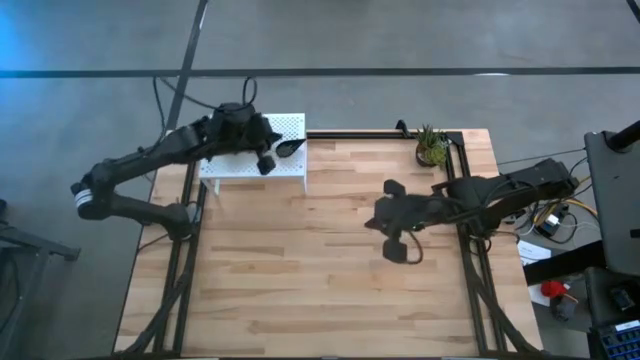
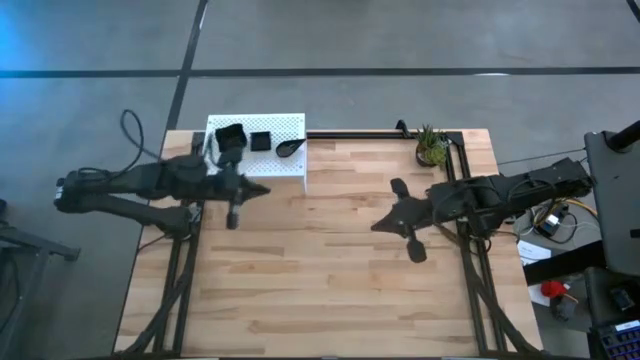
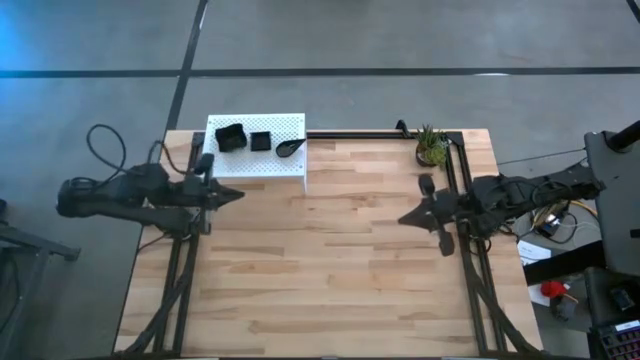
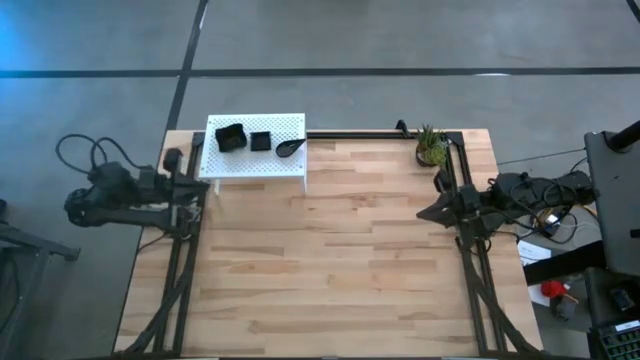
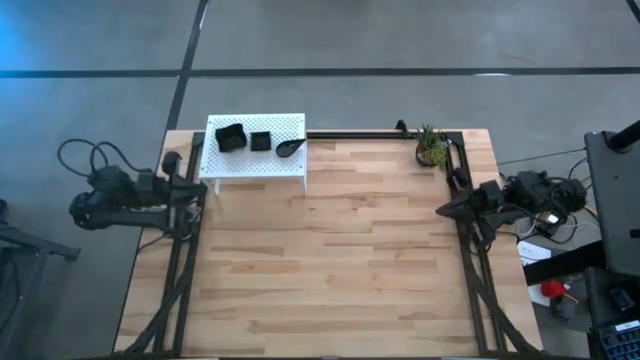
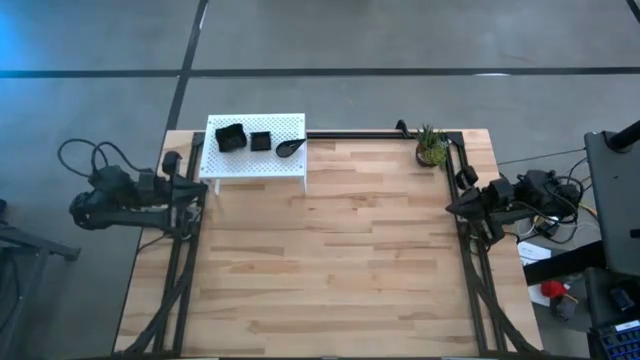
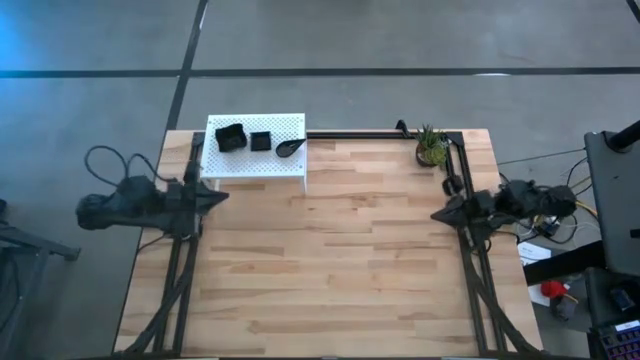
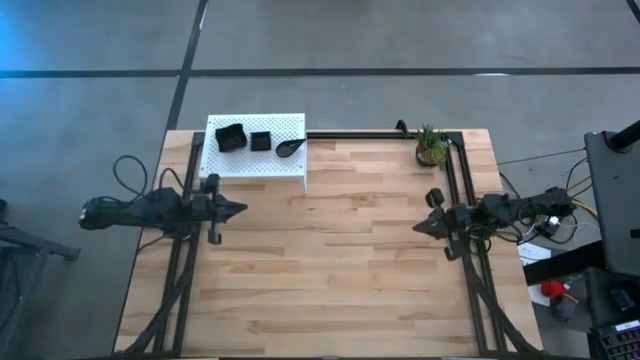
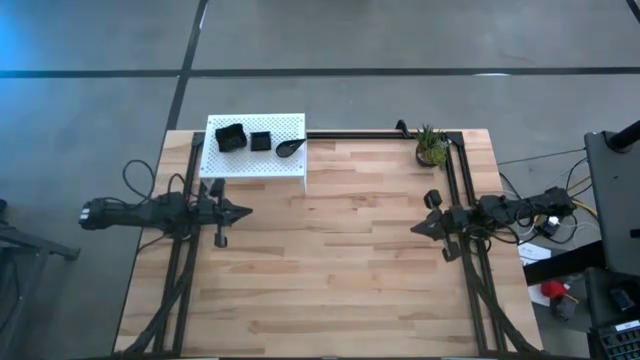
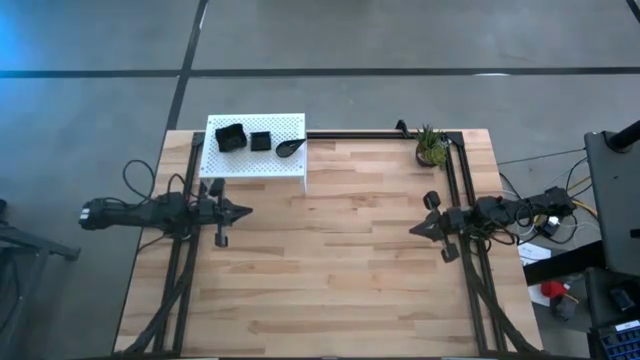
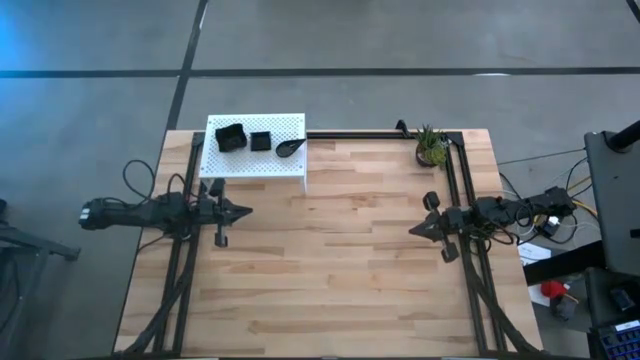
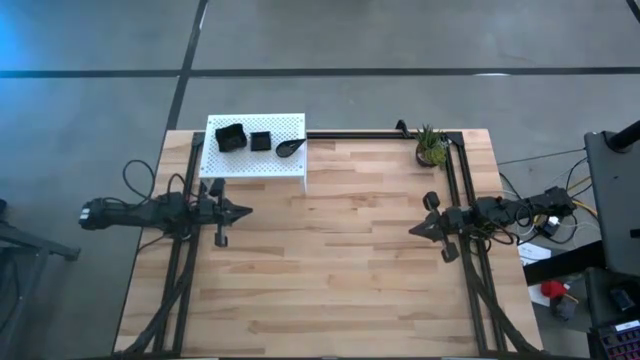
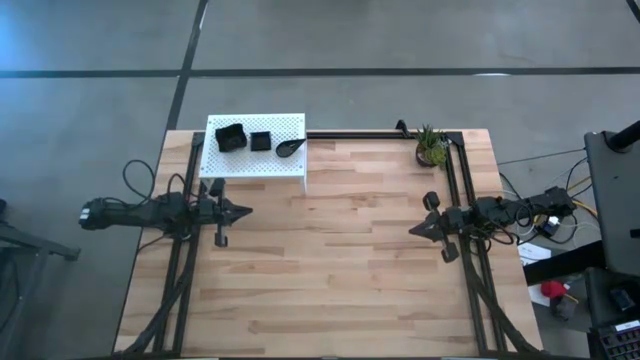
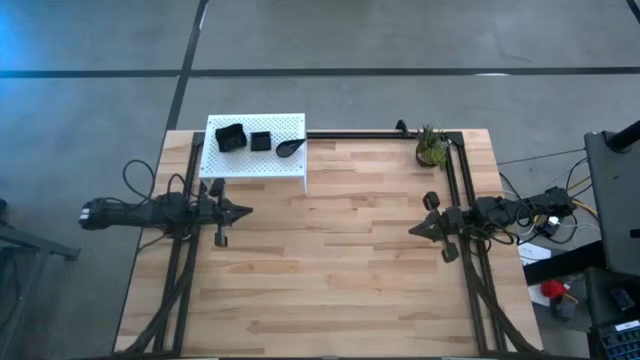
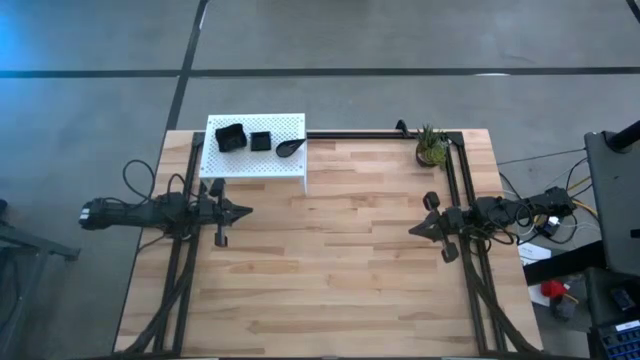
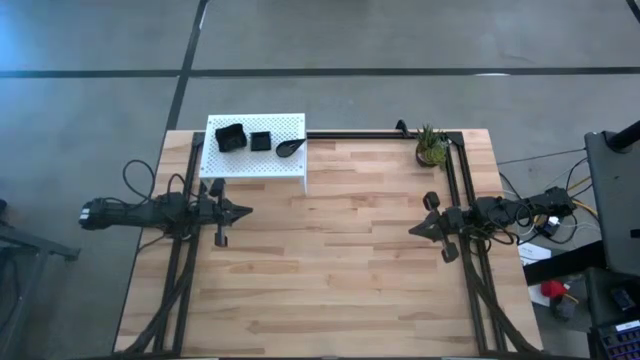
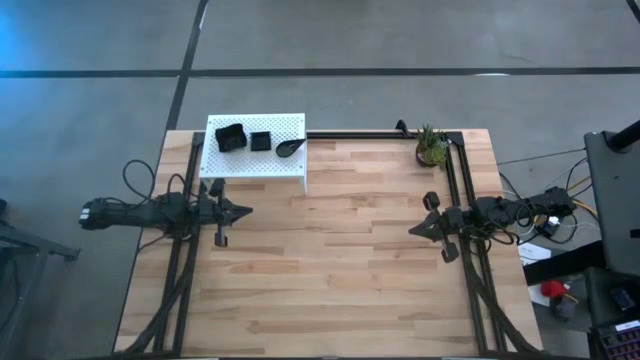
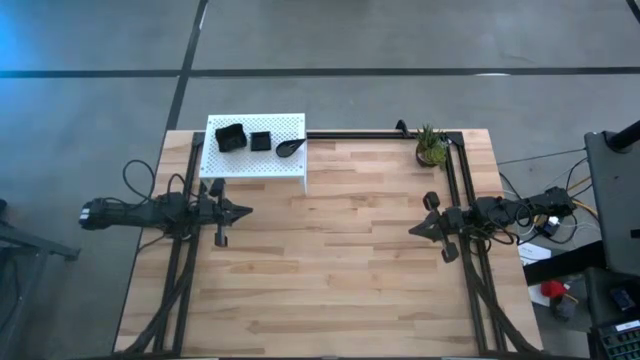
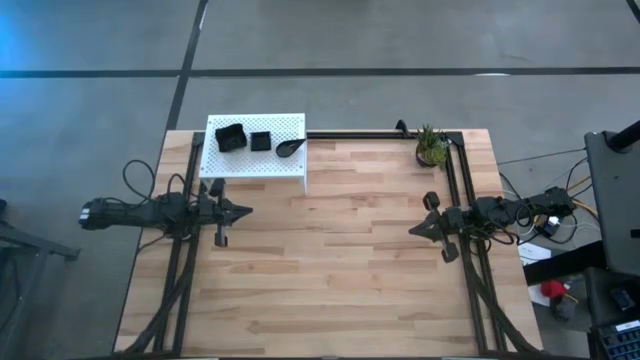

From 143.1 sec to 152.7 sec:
Task: Pick & Place Mini shaped plates
Return to Home Position

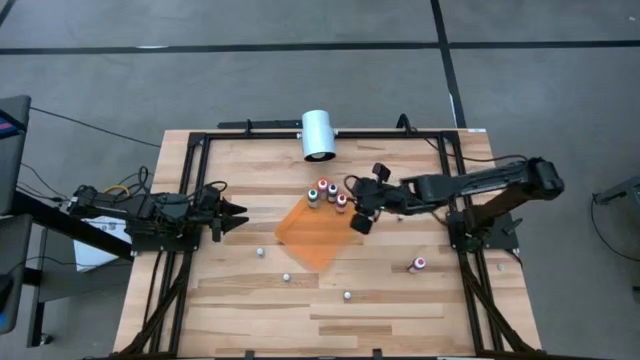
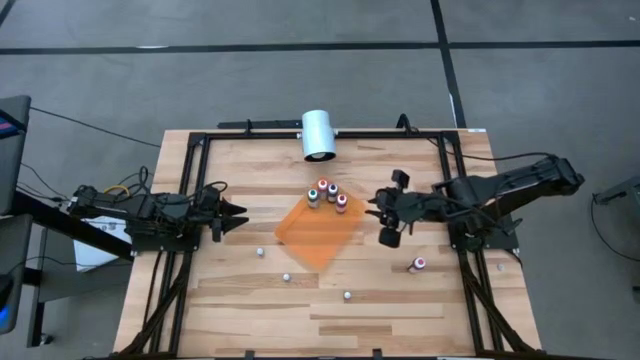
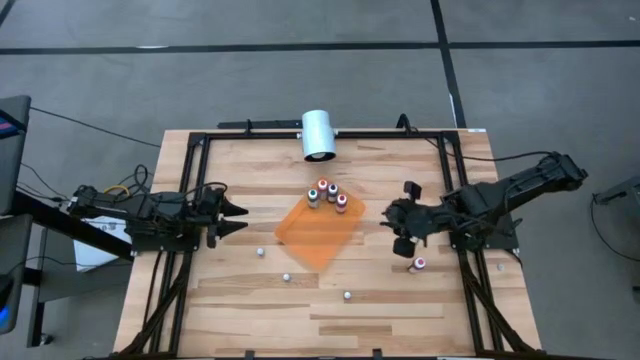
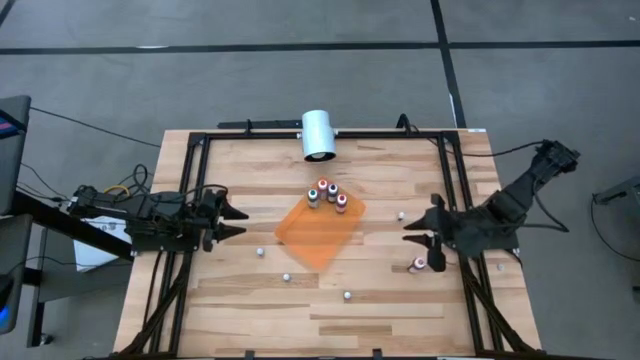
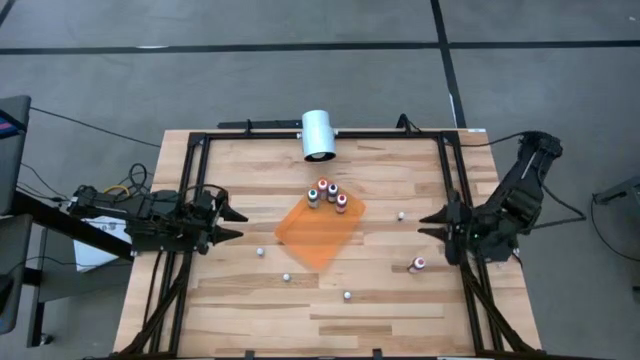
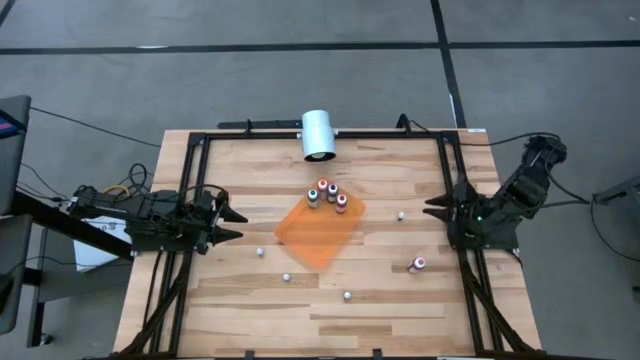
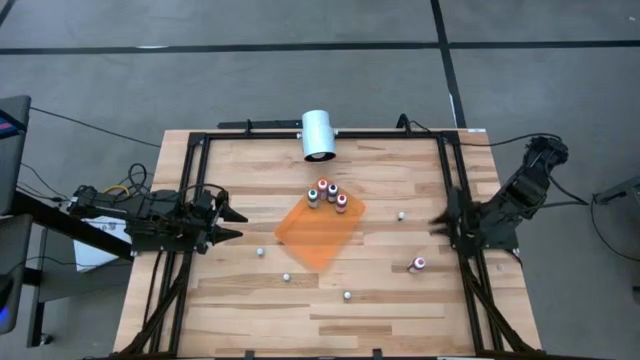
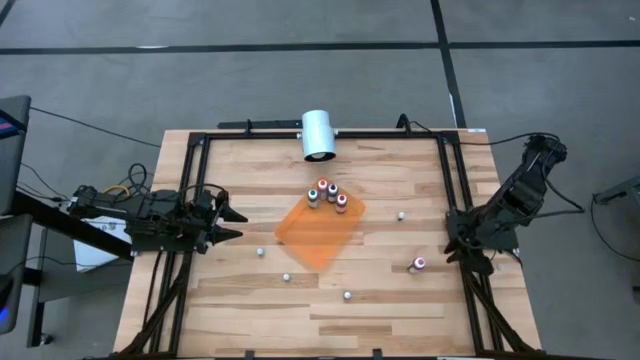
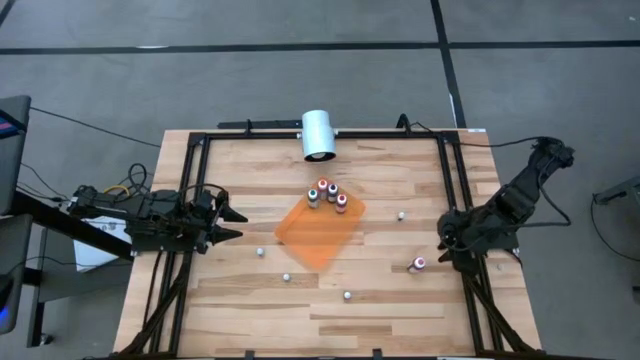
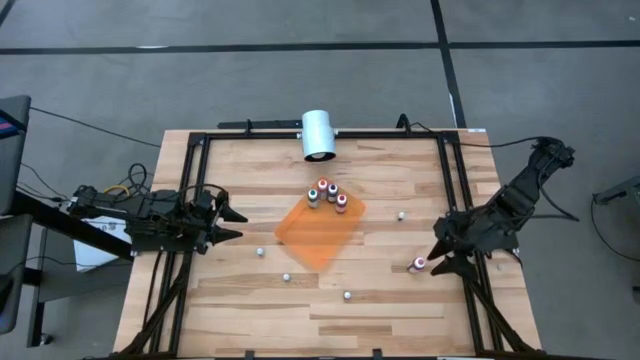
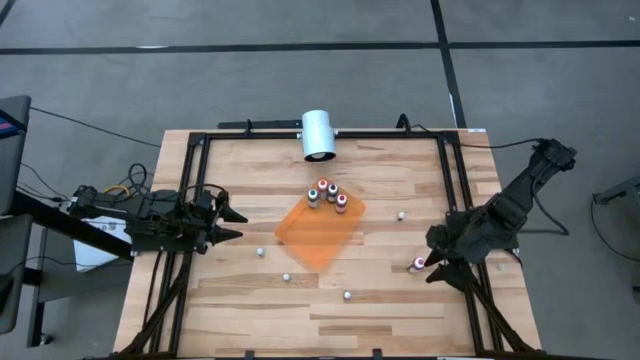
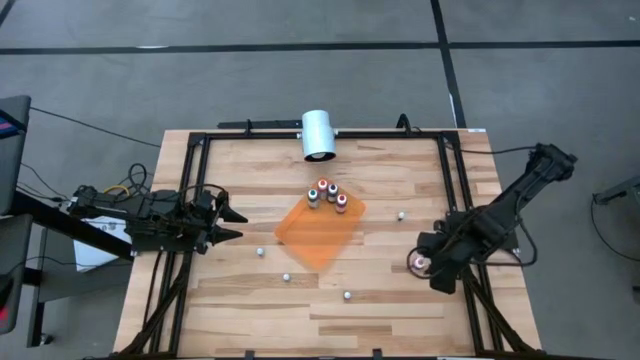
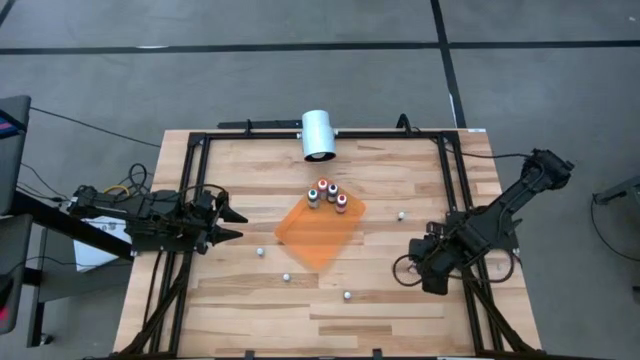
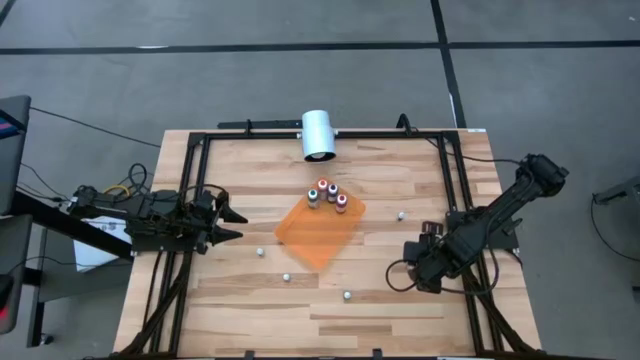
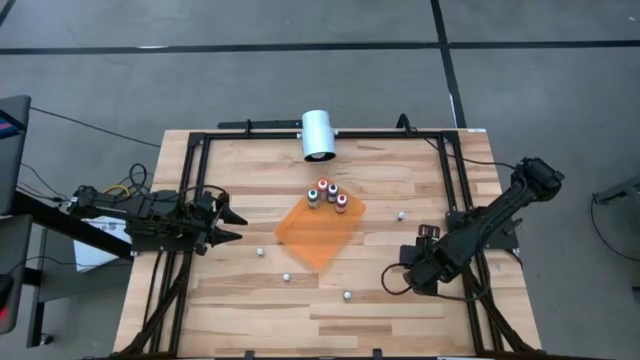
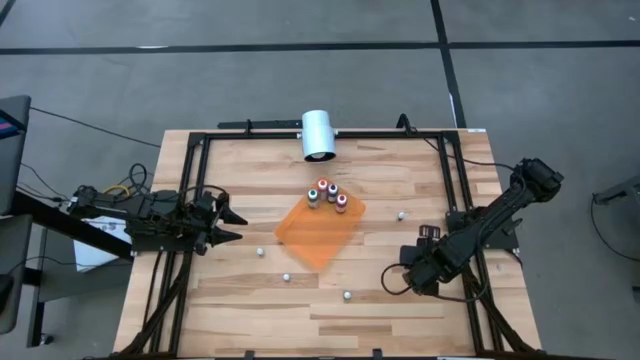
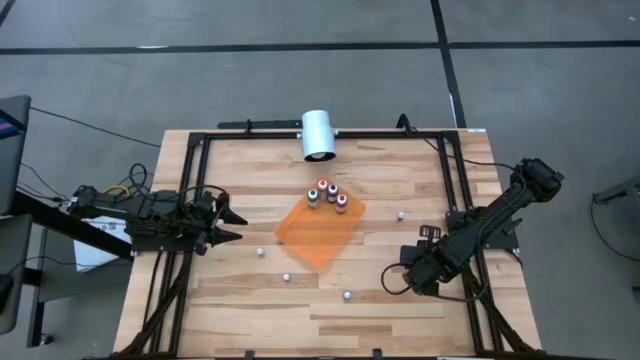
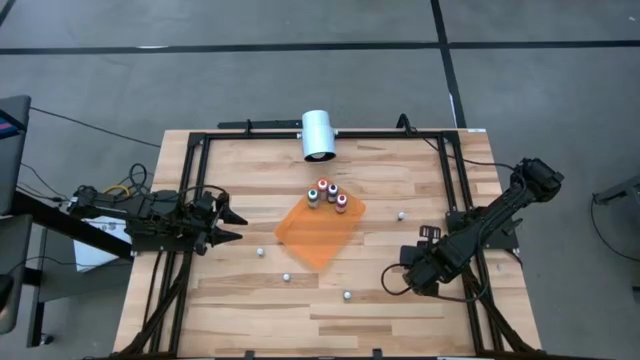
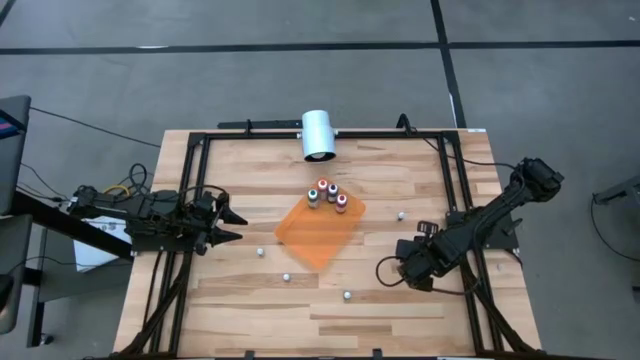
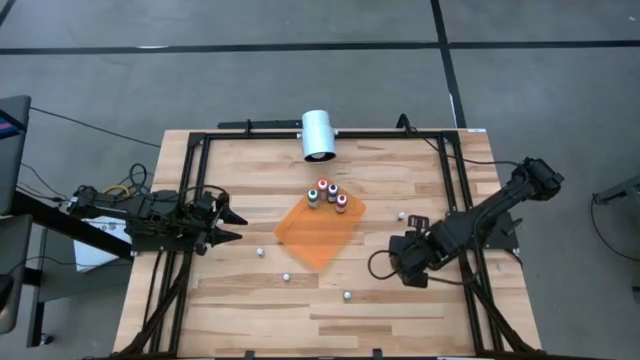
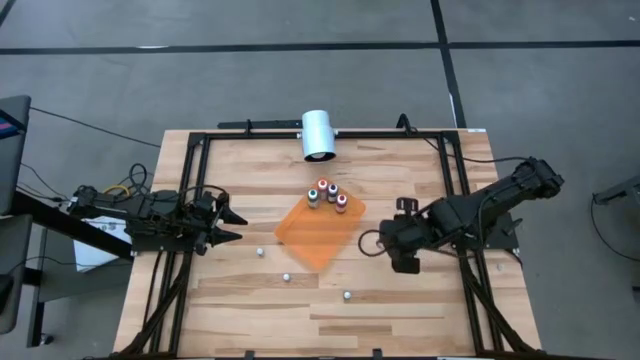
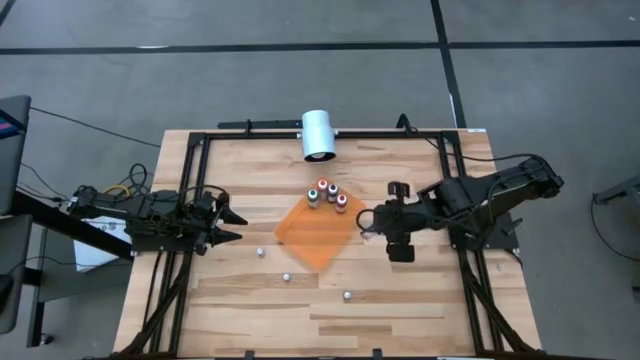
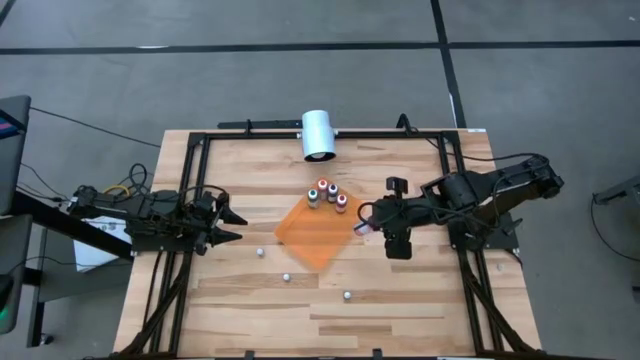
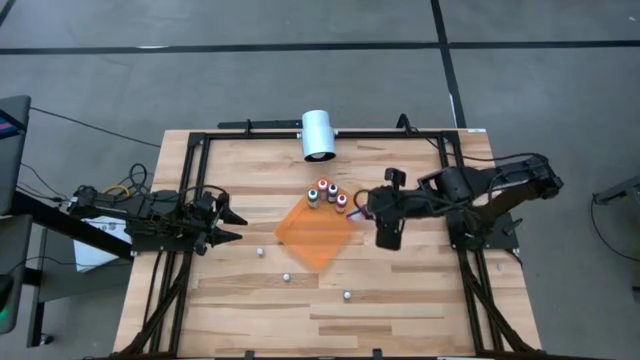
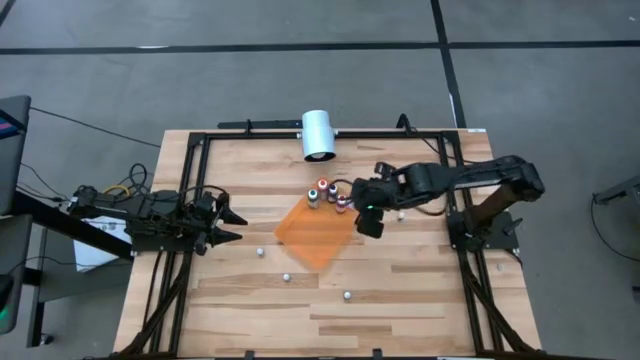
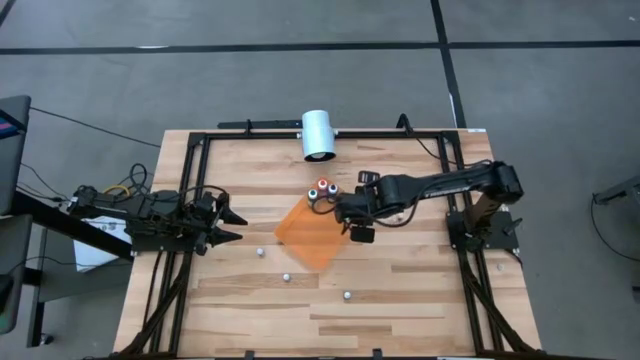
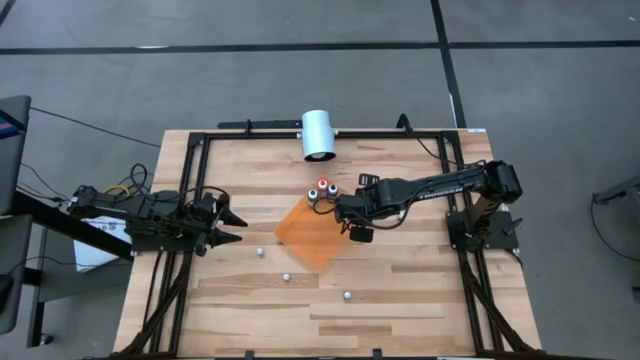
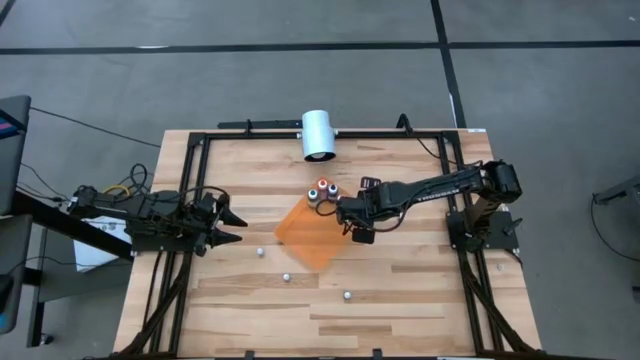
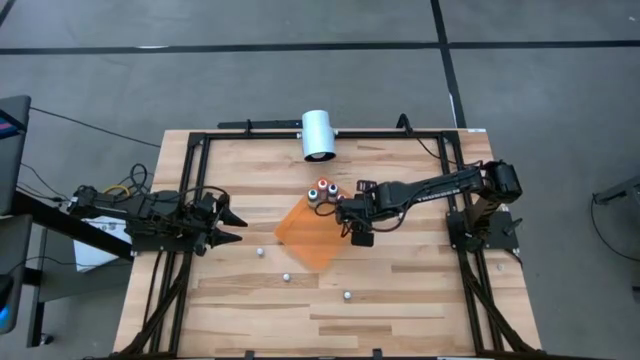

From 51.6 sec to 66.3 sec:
Task: Pick & Place food coloring
Put the big pink food coloring bottle into the orange bin
